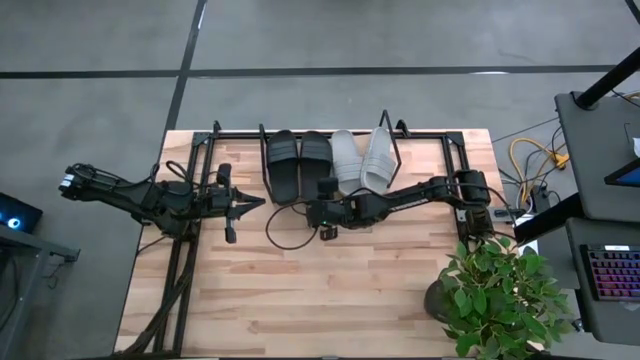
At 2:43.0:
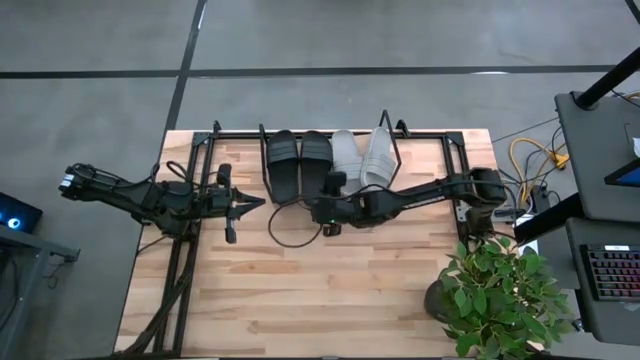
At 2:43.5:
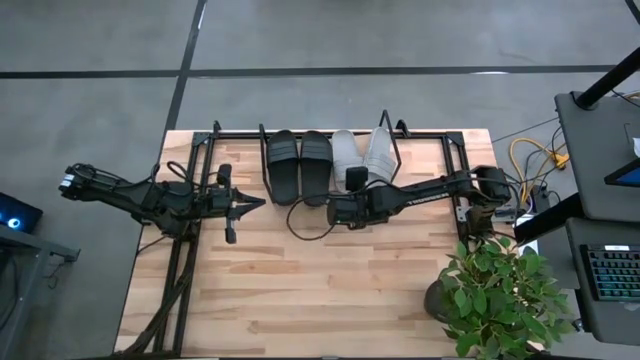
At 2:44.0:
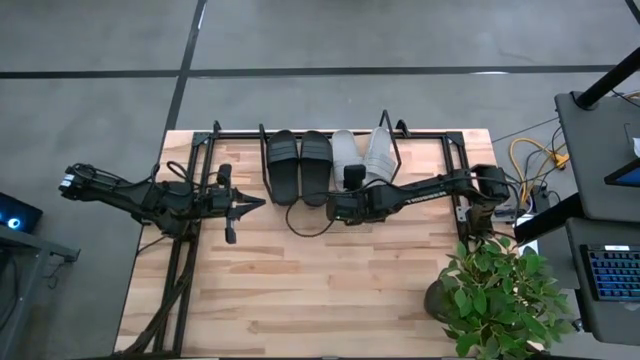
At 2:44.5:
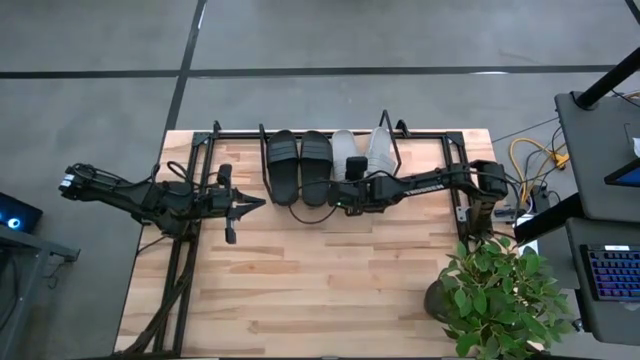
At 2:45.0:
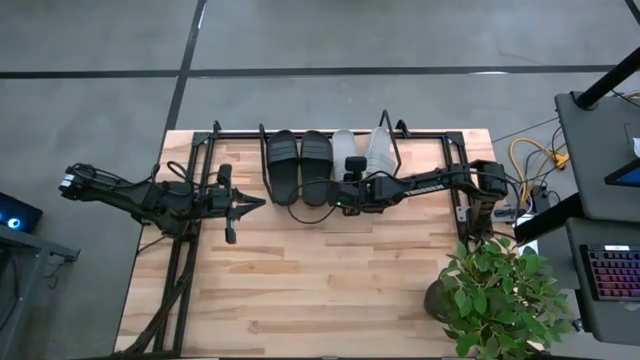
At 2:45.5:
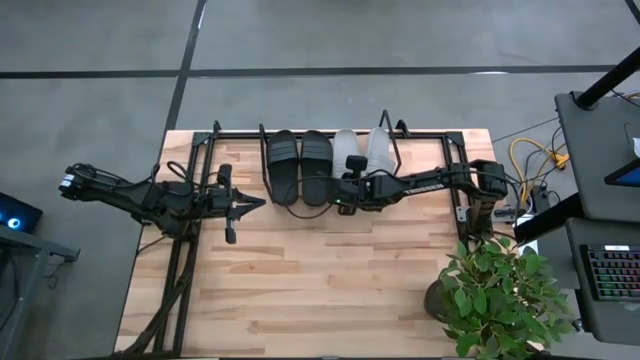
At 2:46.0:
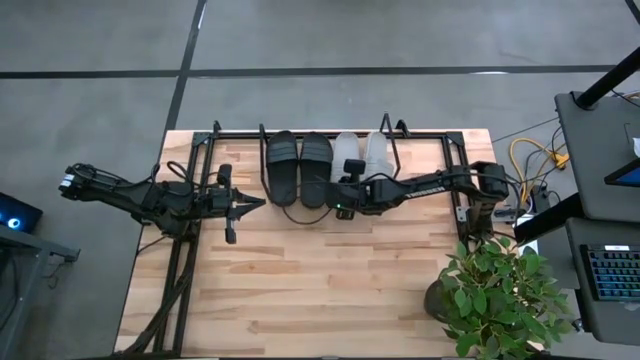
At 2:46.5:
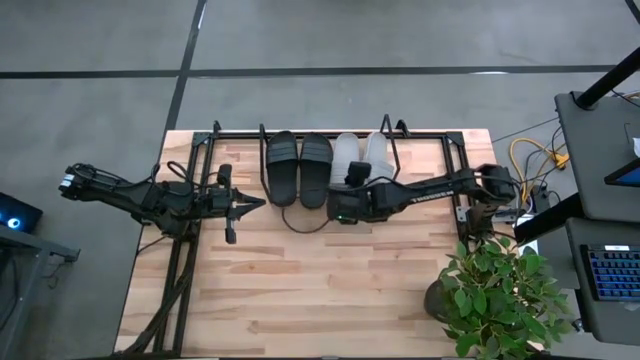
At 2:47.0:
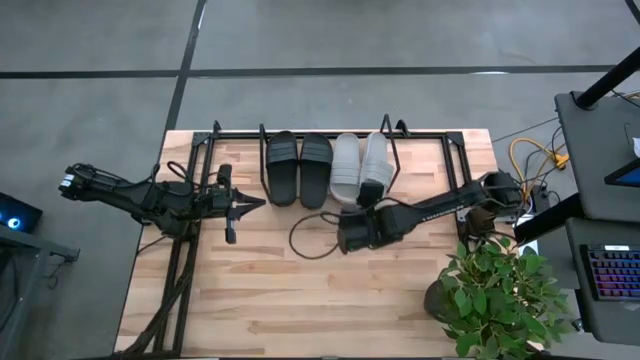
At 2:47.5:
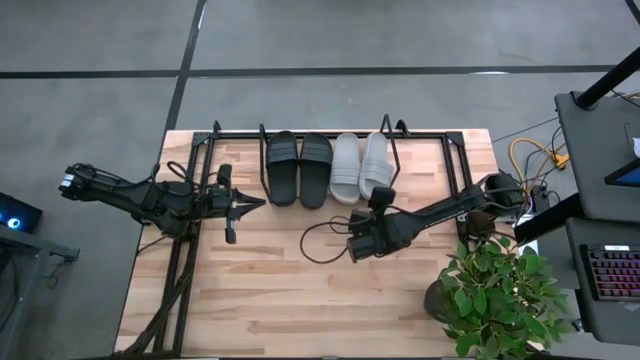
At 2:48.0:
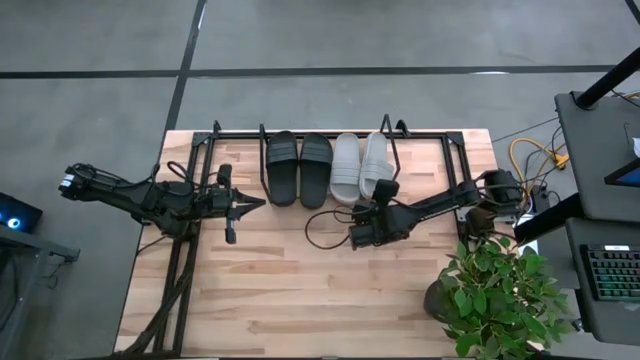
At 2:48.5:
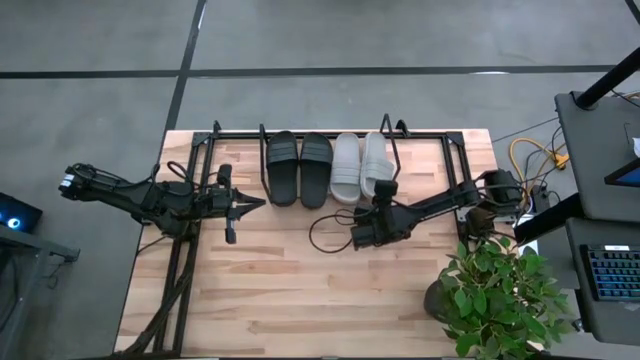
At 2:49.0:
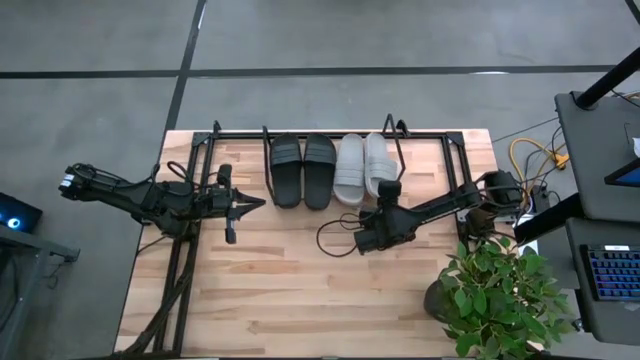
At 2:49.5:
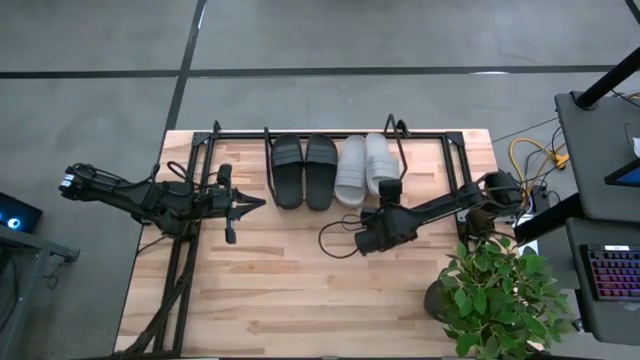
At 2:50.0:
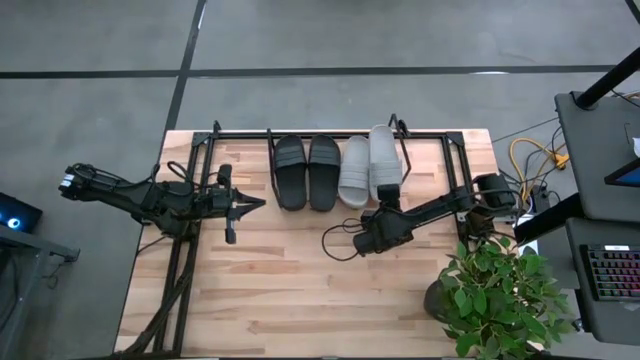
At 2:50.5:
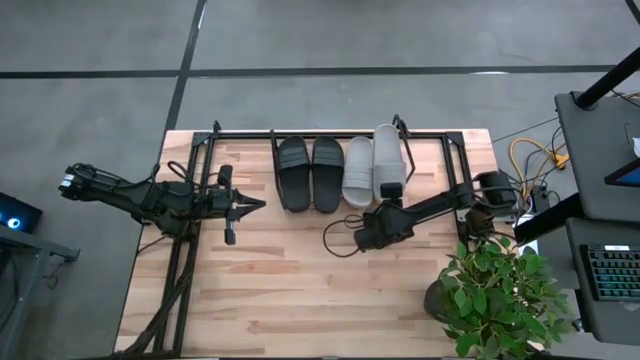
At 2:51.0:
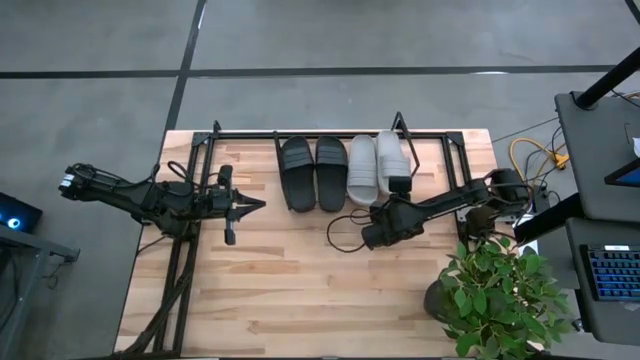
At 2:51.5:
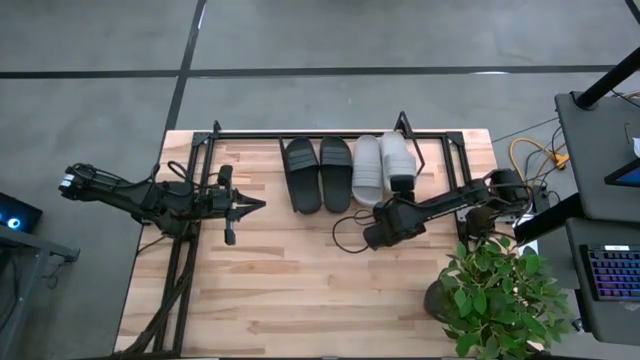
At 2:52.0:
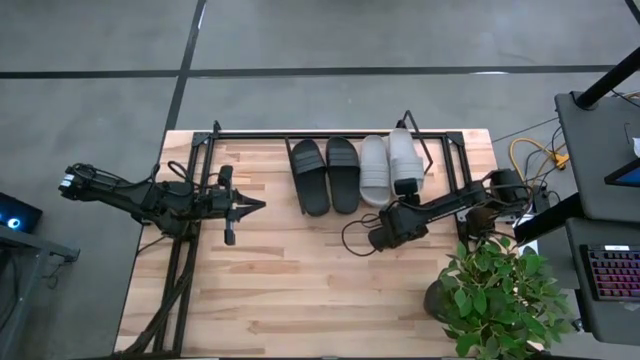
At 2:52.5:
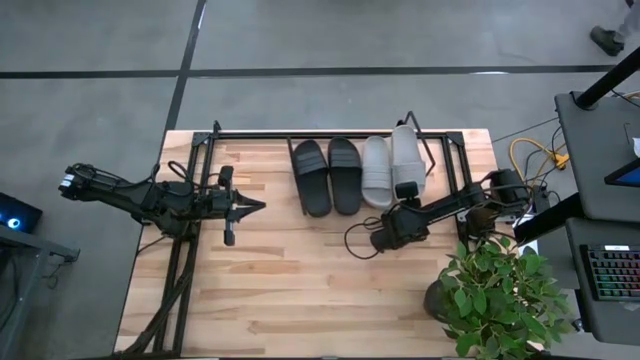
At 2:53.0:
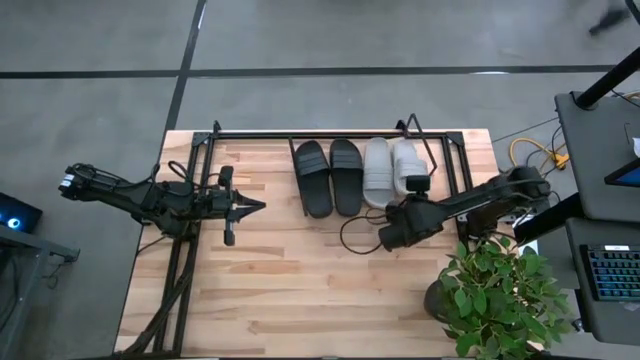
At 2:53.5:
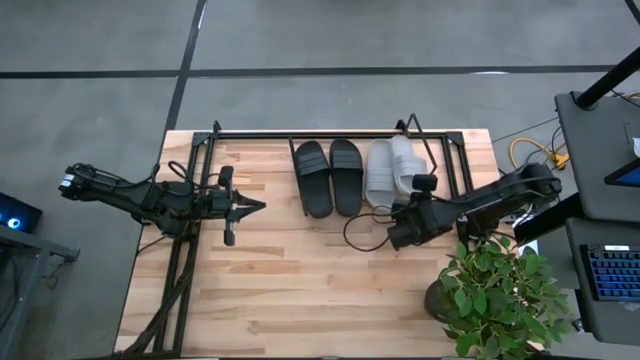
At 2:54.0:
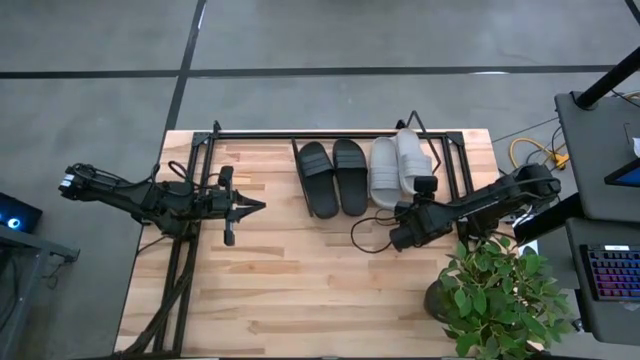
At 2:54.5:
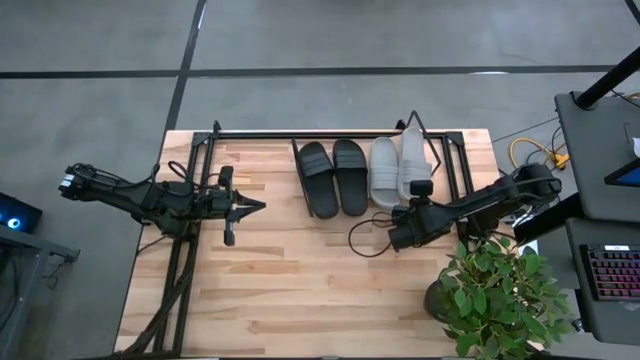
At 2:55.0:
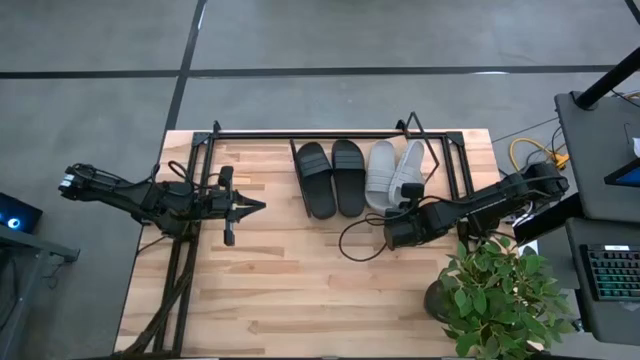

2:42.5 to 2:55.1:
Task: Pick and place slides into the shelf
Adjust the gray slides from the shelf

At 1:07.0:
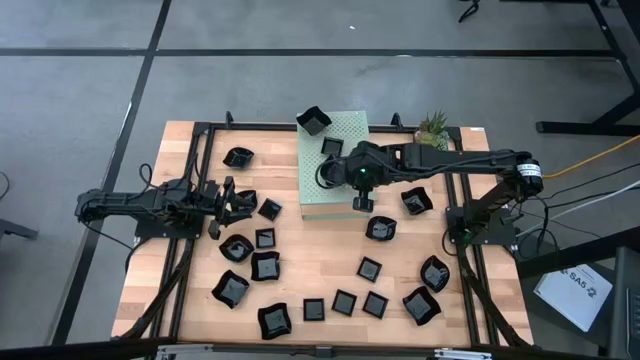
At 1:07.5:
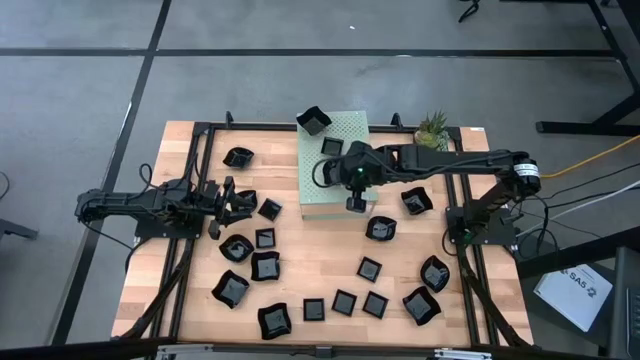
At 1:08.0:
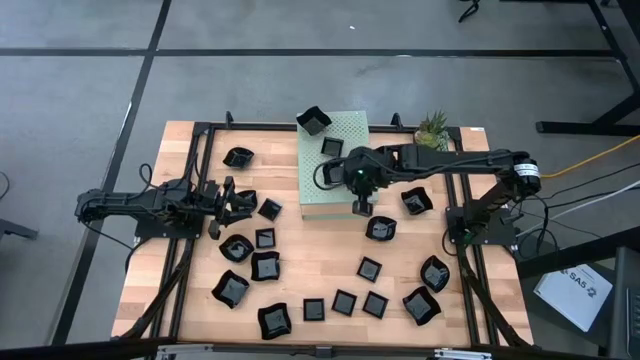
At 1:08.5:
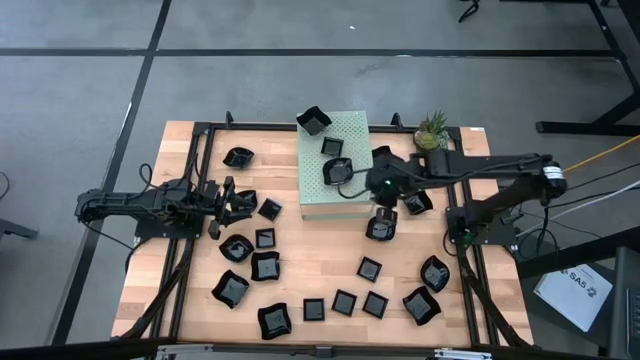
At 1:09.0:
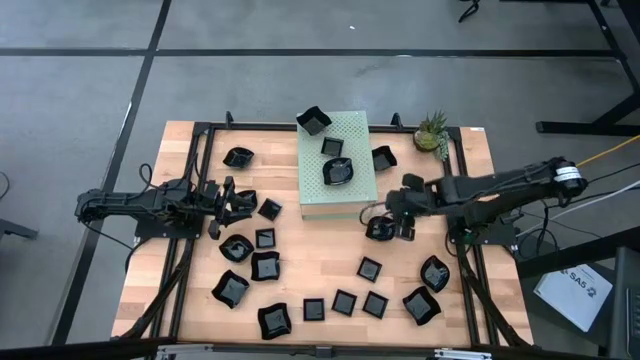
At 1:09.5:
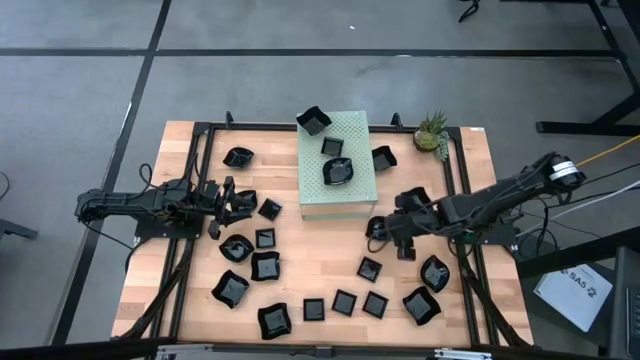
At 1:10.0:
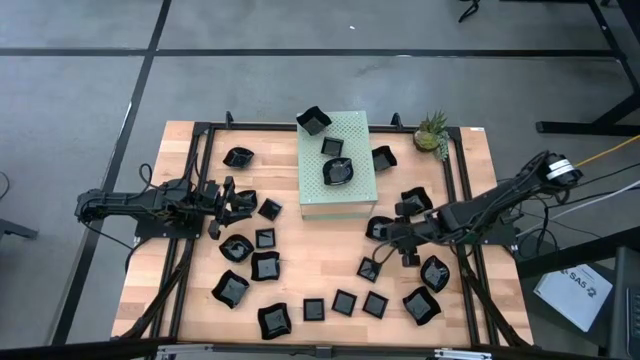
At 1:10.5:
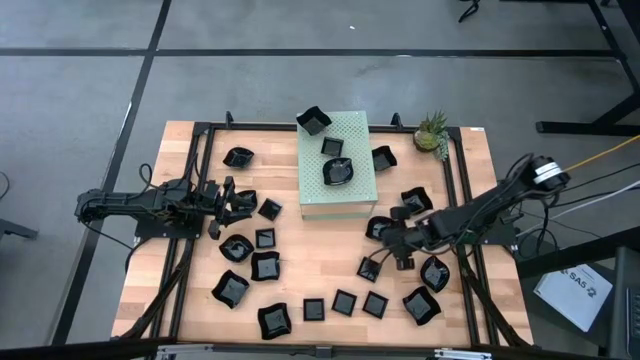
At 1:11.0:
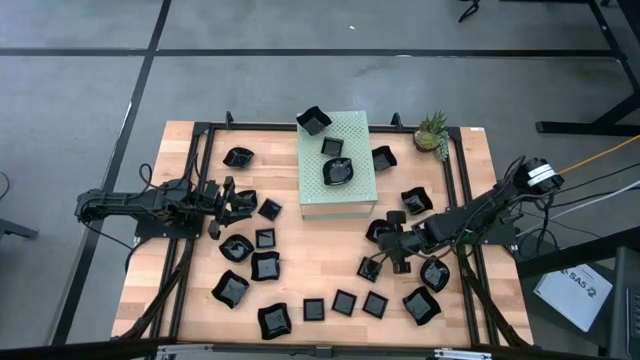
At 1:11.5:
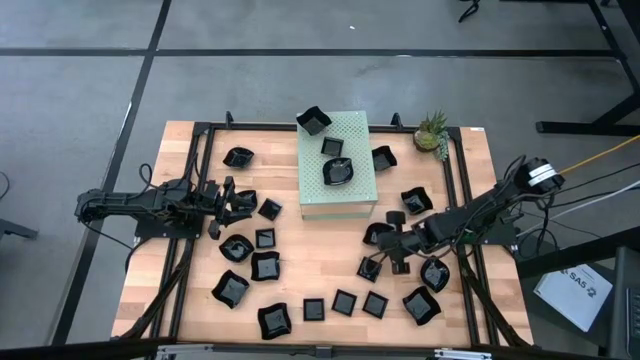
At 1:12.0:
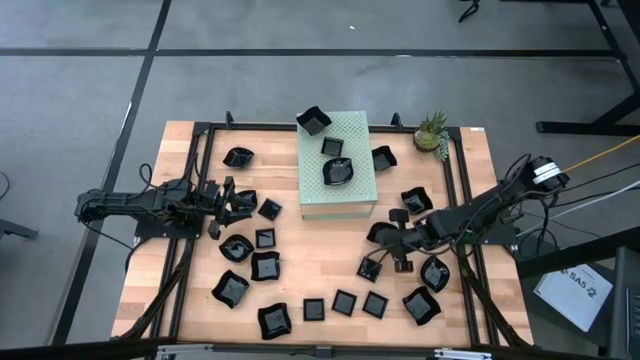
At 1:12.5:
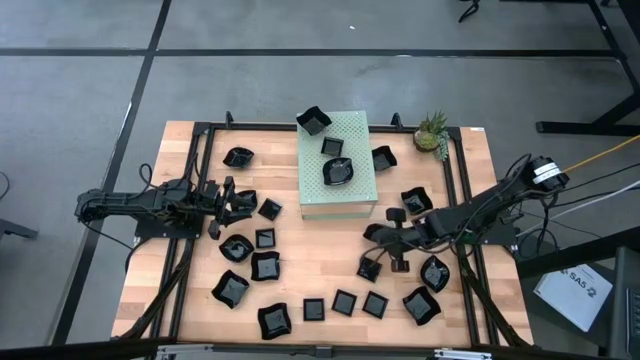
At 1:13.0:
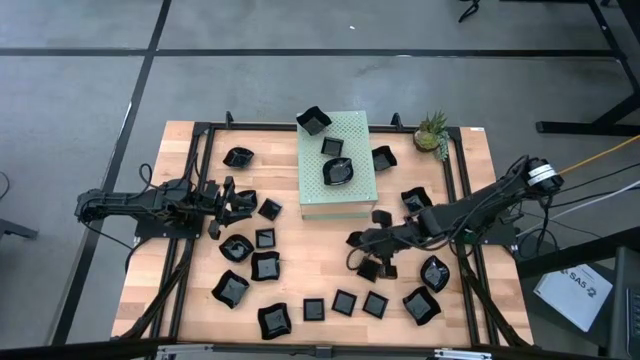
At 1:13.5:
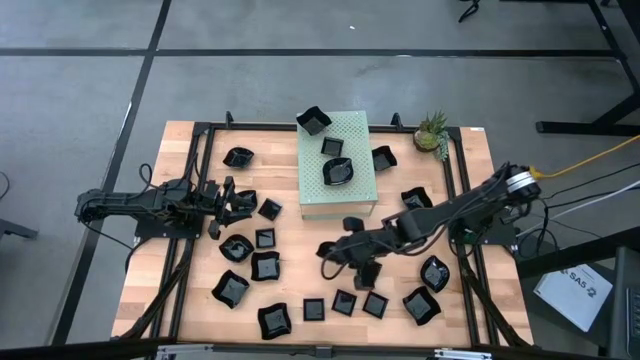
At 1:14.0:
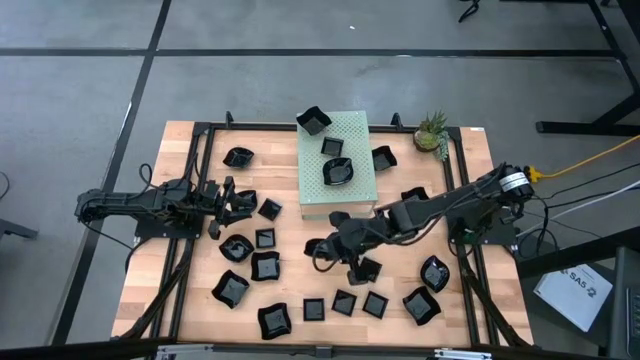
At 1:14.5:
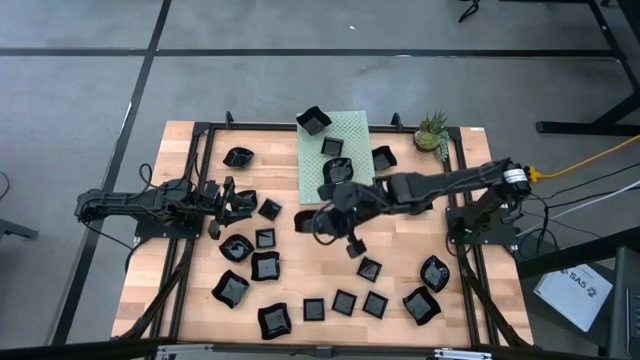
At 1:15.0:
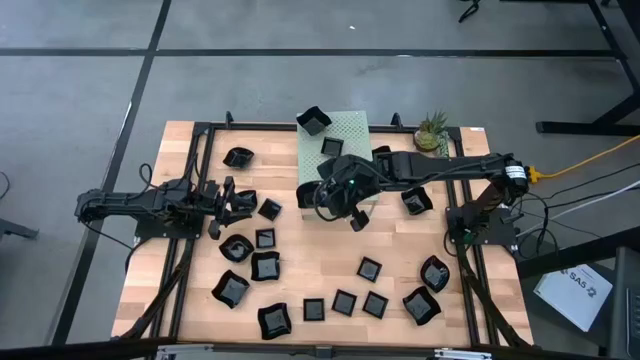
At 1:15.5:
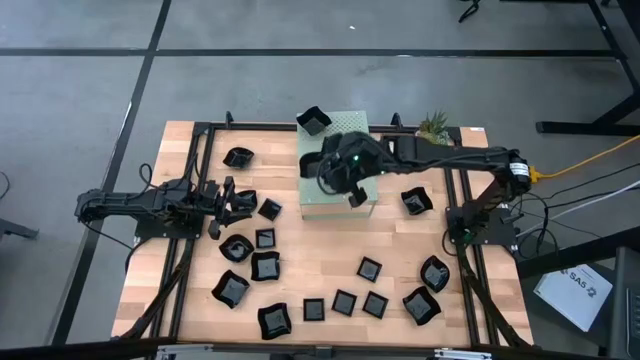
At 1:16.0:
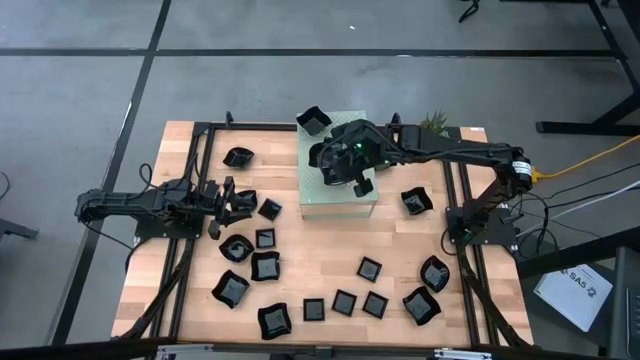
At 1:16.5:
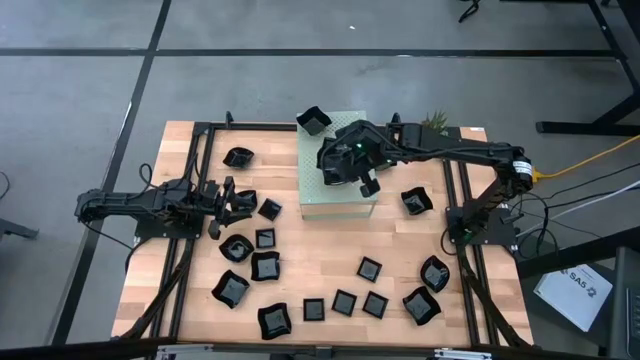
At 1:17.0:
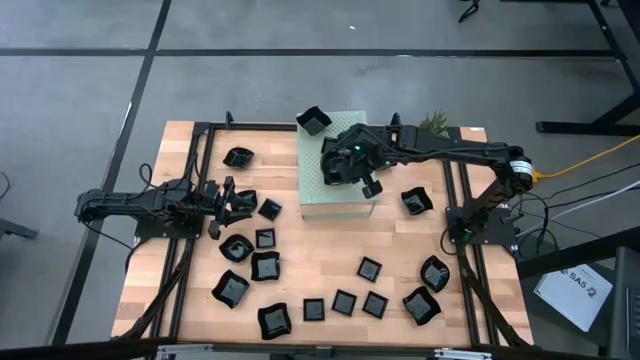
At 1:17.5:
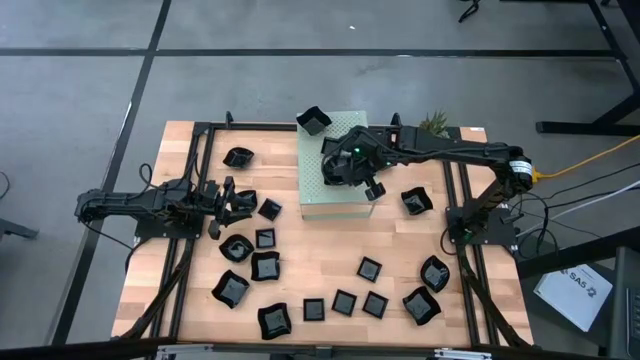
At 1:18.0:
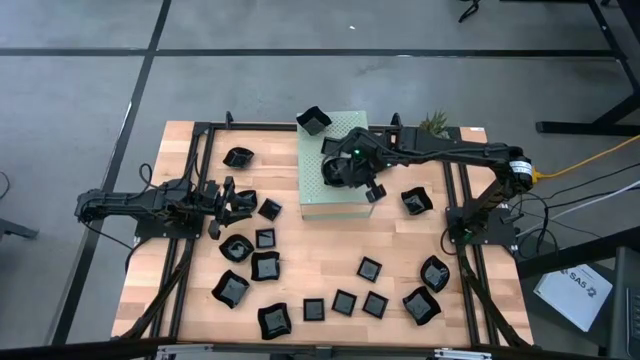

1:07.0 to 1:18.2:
Task: Pick & Place Mini shaped plates
Stack the black leaf shaped plate on top of the black leaf shape plates on the shelf
